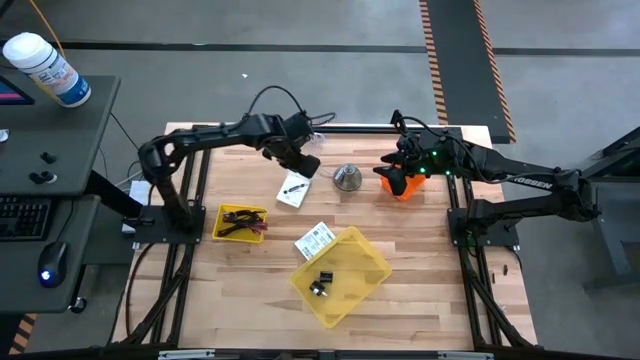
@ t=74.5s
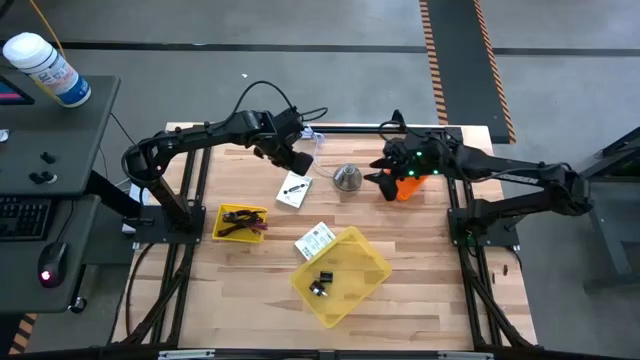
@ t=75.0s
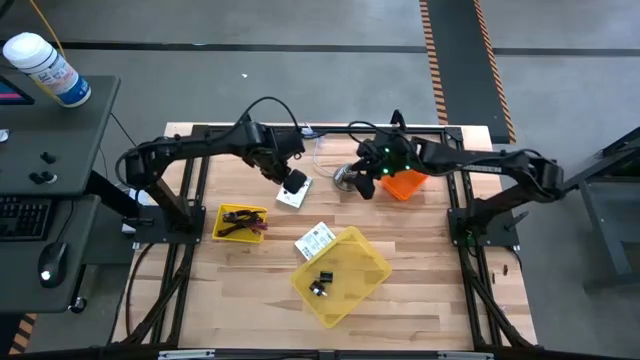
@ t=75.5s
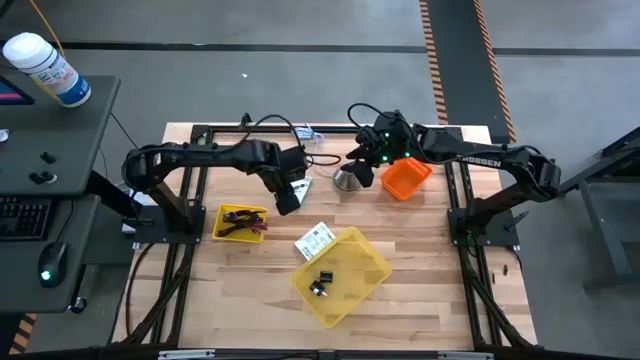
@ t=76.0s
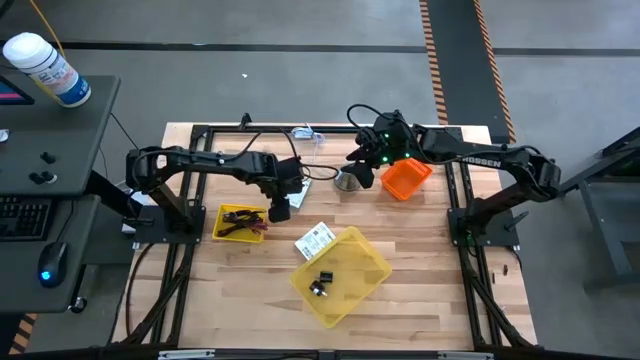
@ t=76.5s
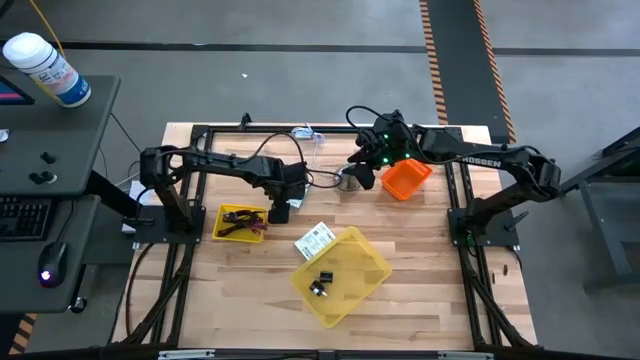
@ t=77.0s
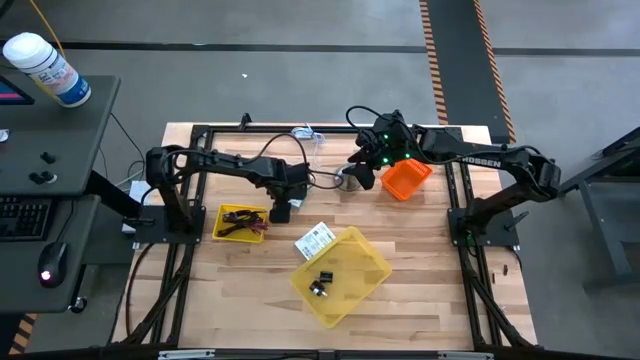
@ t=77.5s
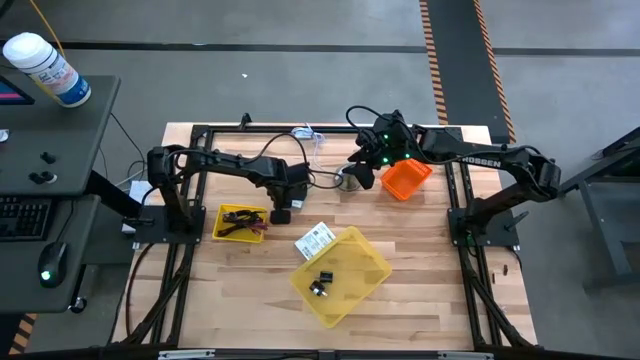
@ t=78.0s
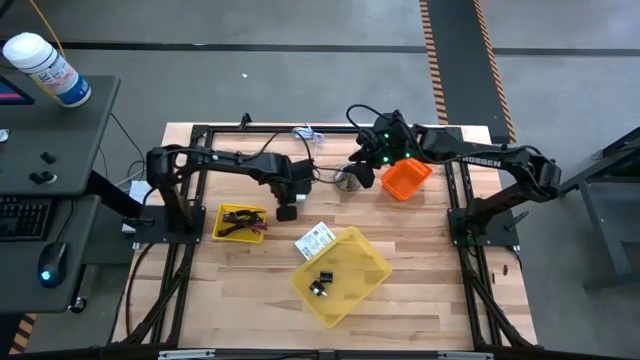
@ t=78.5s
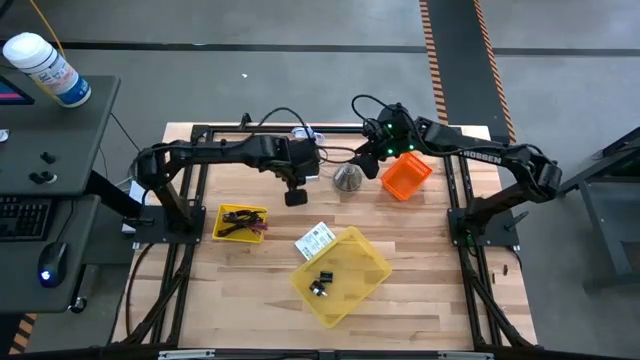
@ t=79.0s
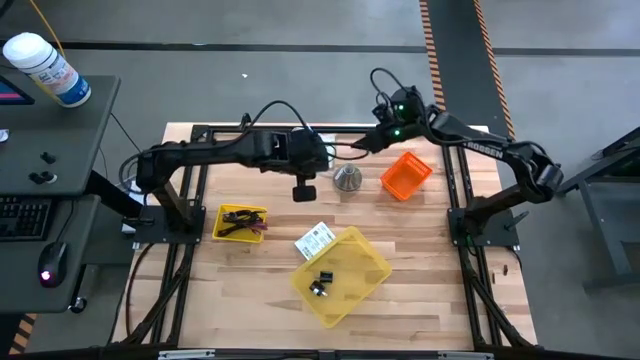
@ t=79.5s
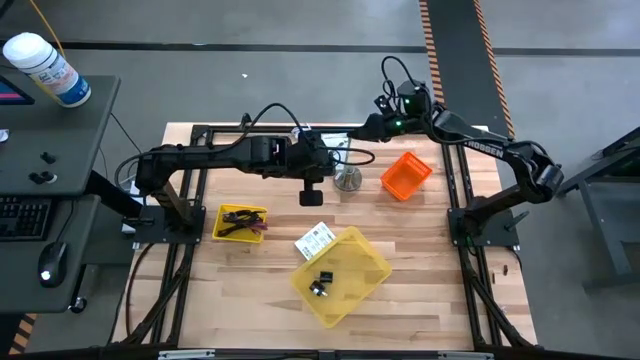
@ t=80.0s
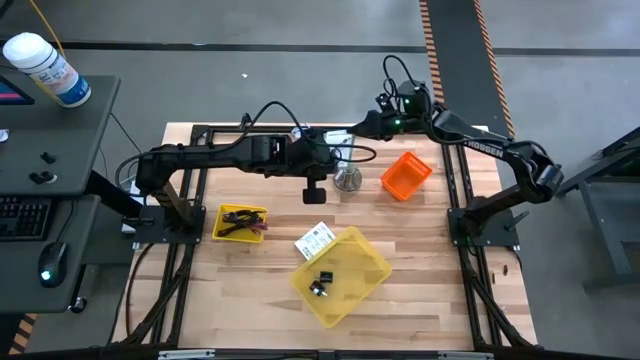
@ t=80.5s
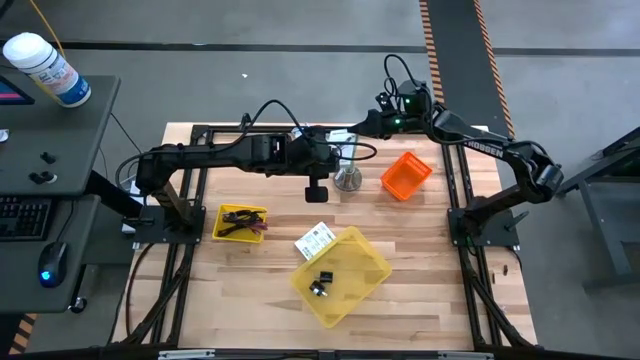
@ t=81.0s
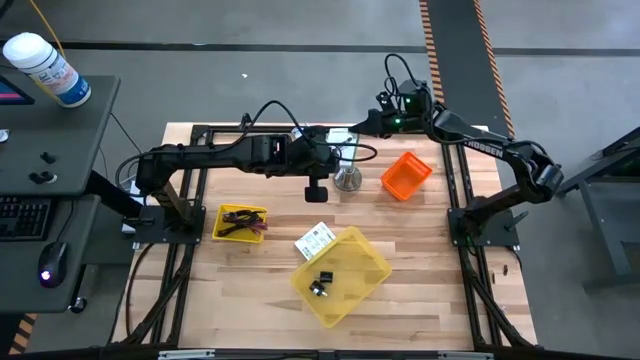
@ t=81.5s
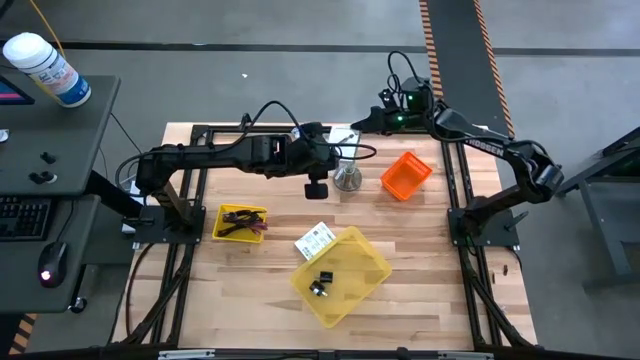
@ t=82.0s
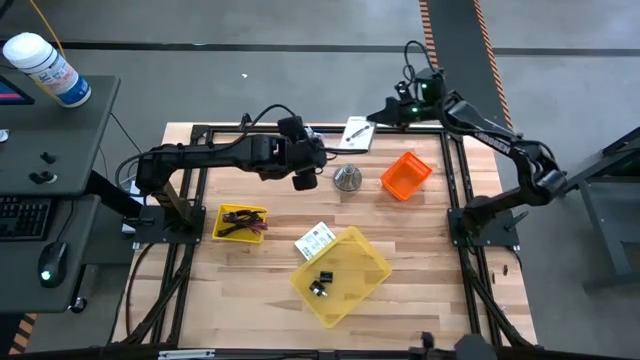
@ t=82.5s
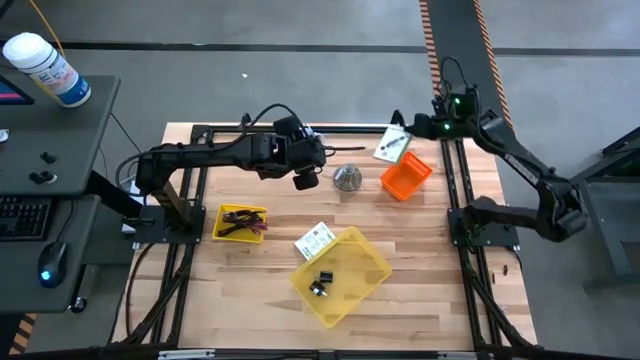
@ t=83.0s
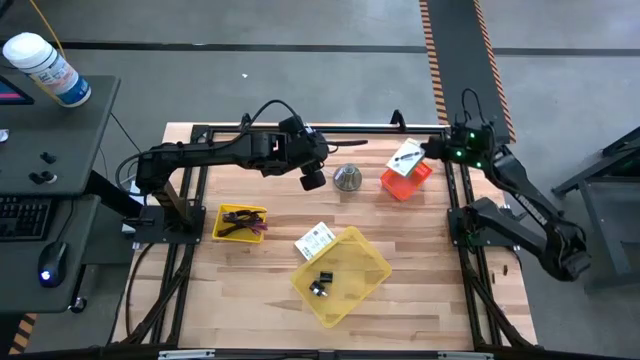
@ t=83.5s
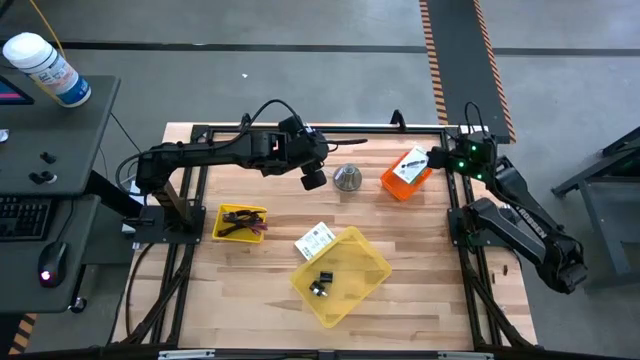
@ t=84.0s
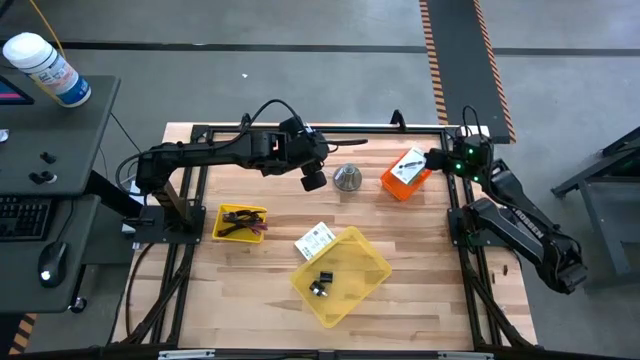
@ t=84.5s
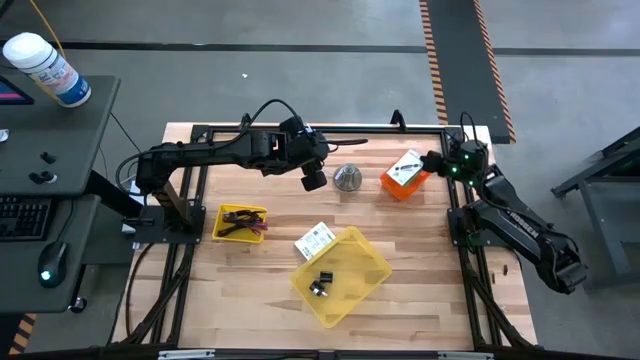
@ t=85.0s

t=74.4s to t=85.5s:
Task: Pick and place items into bin
Put the top white card reader box into the orange bin

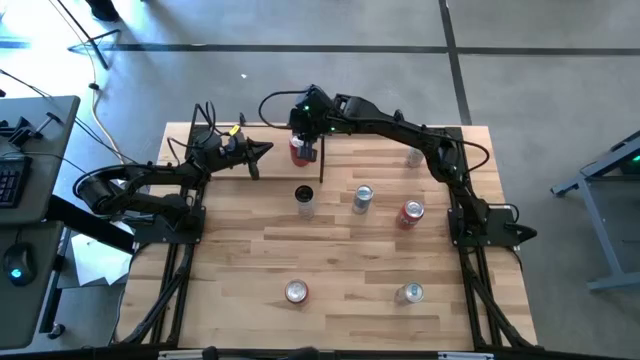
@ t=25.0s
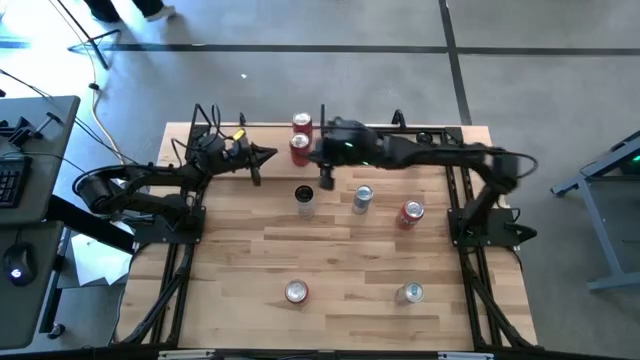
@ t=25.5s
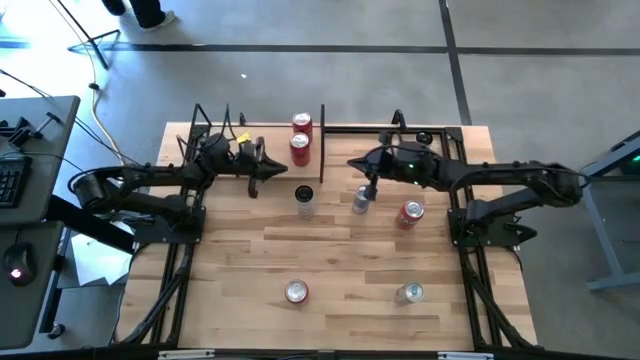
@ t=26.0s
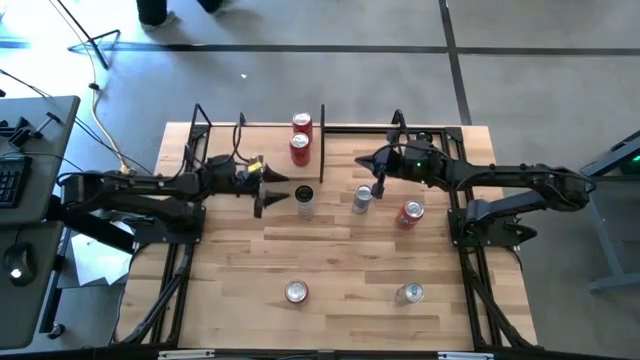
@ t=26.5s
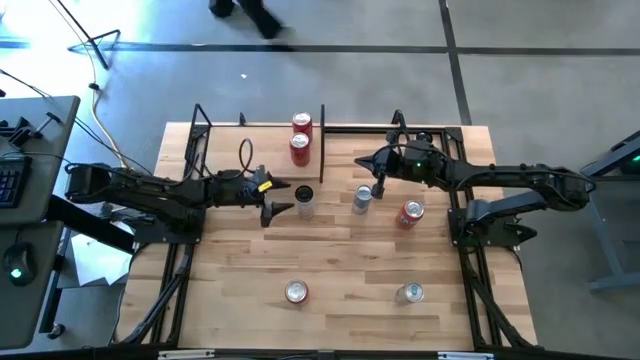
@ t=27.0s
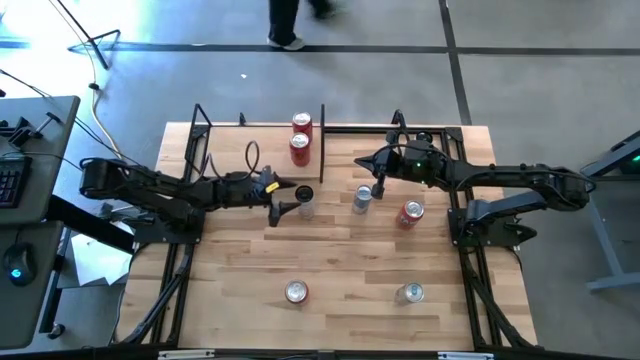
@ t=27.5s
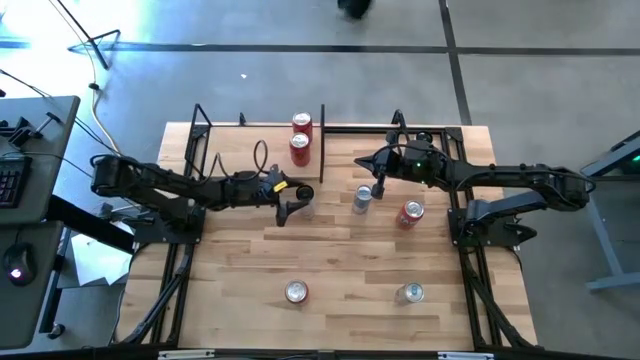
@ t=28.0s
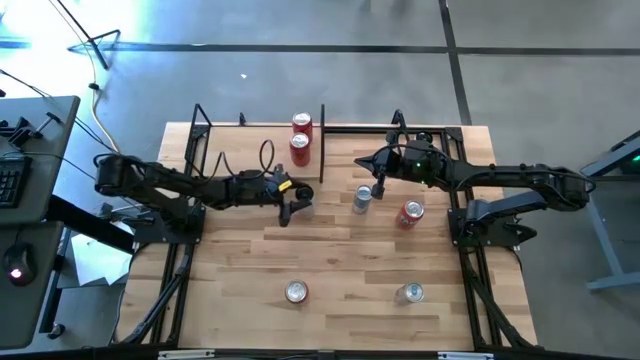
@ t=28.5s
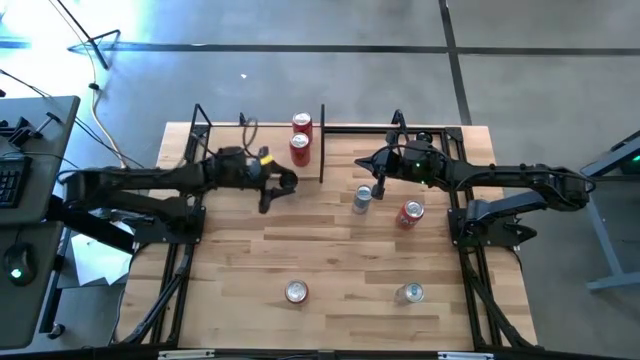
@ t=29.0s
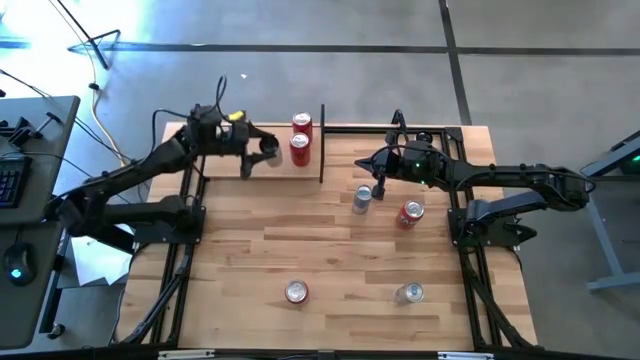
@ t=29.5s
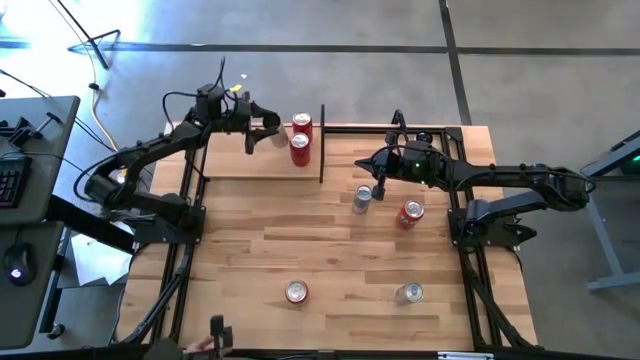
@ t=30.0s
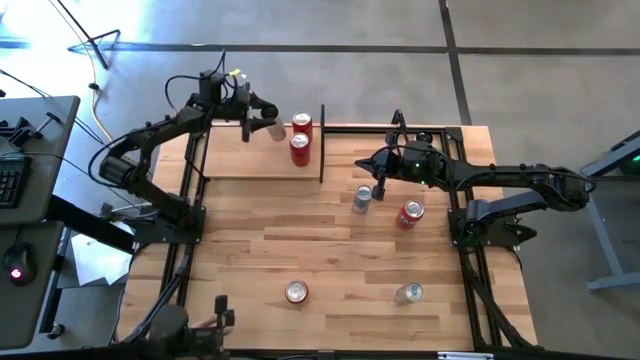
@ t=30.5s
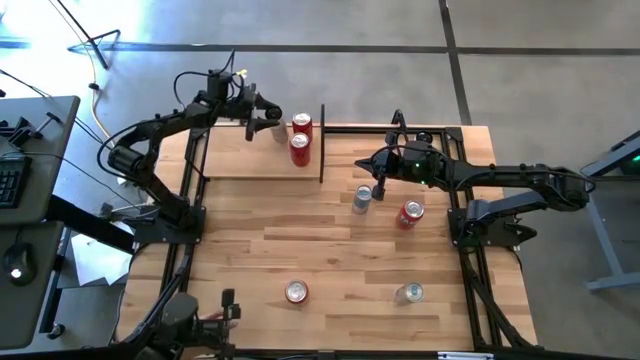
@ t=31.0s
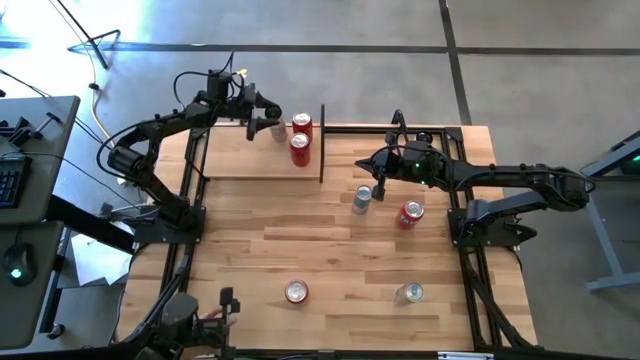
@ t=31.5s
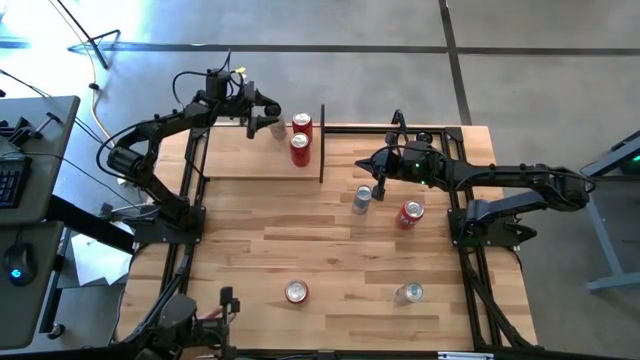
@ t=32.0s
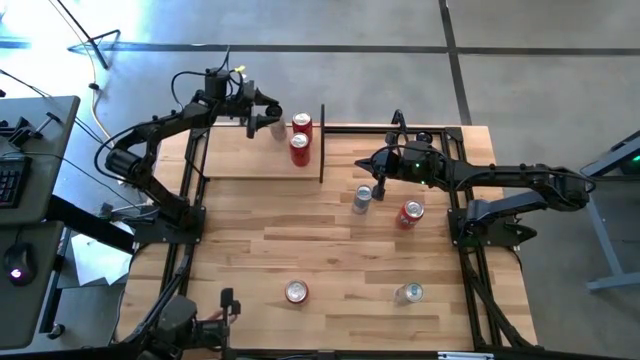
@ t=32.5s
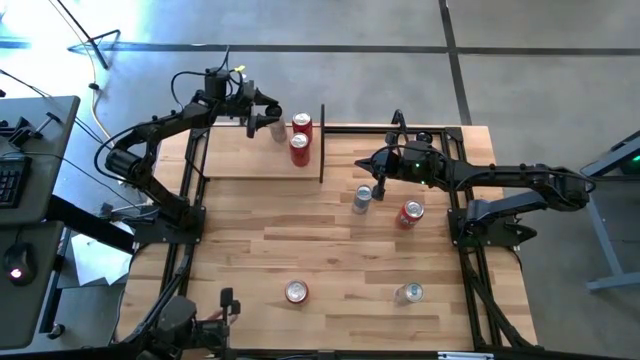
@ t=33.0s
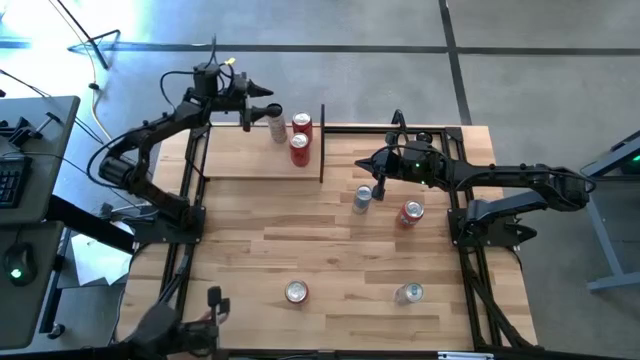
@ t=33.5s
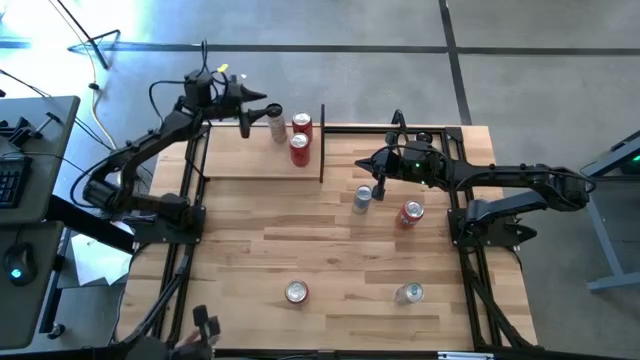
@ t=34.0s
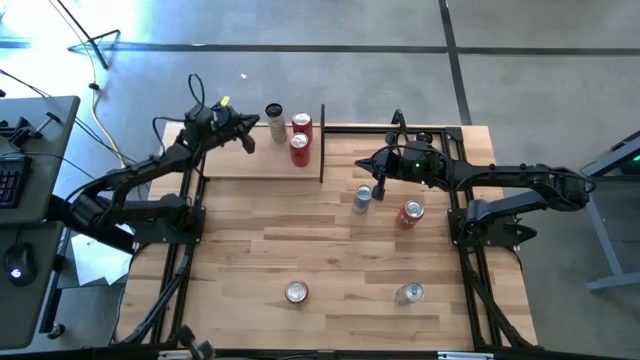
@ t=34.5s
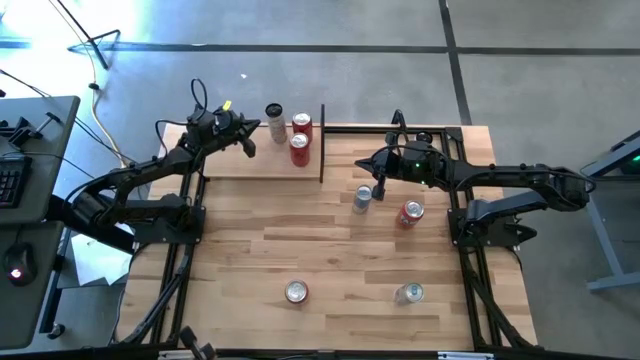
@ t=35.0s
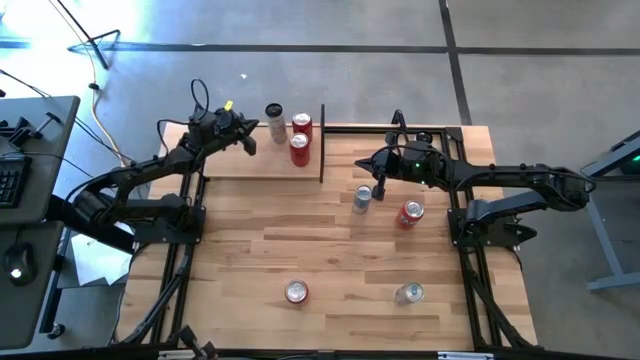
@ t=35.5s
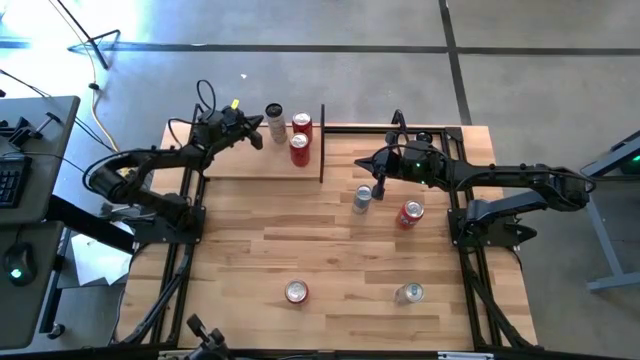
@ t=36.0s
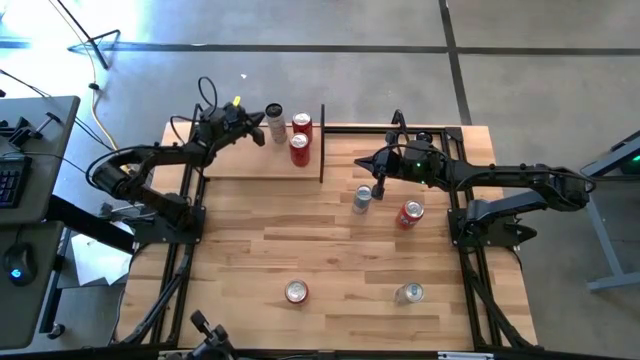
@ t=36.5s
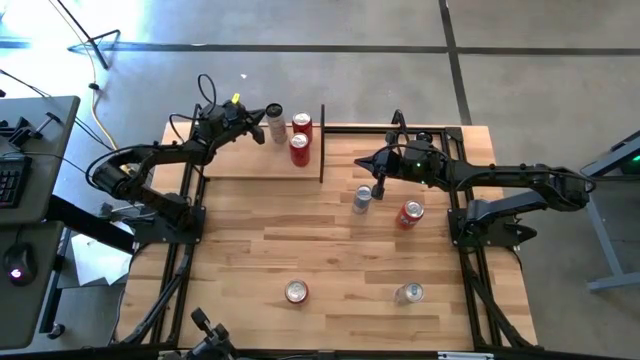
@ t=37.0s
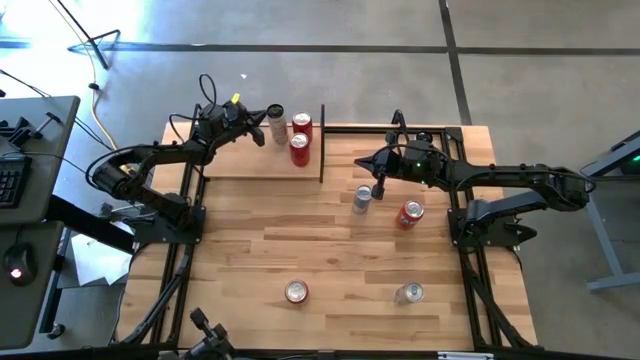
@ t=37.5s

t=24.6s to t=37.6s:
Task: Place canned beverage on shelf
Put the bottom white yellow soda can on the shelf
